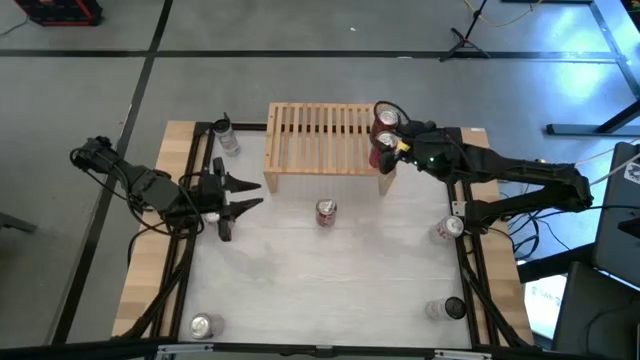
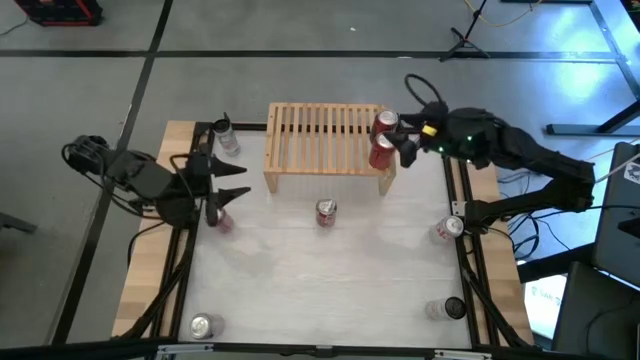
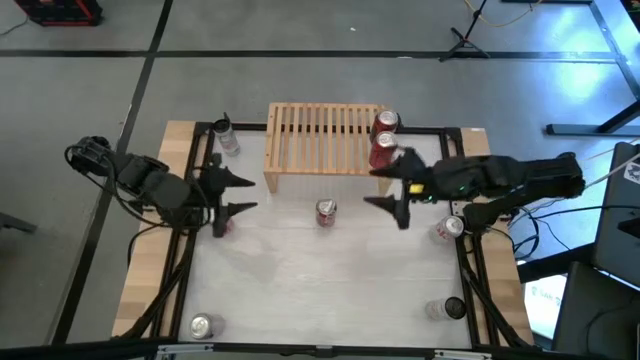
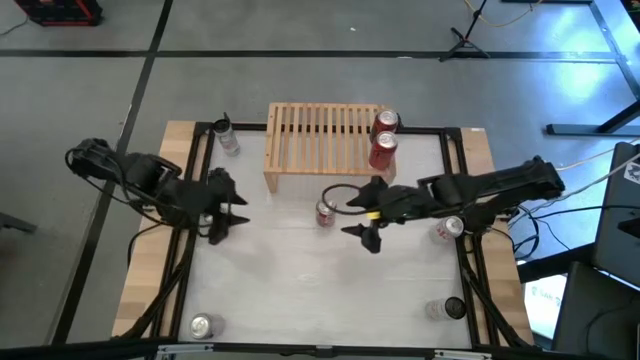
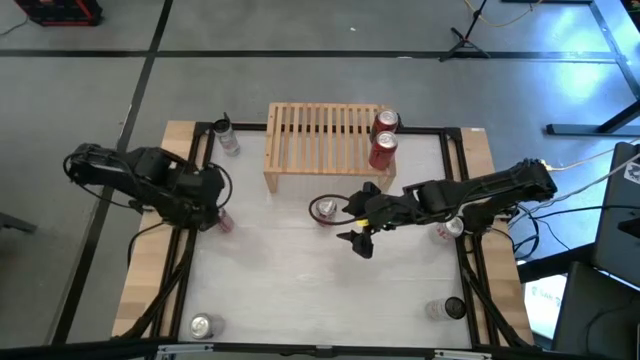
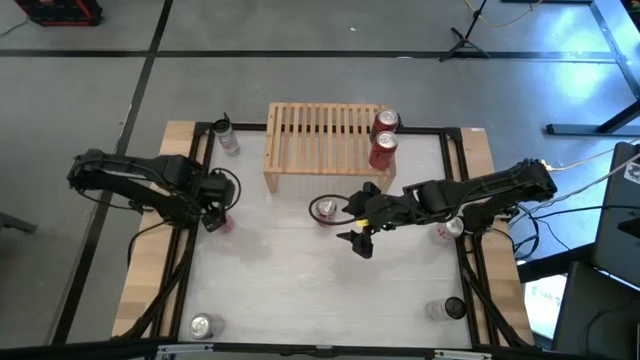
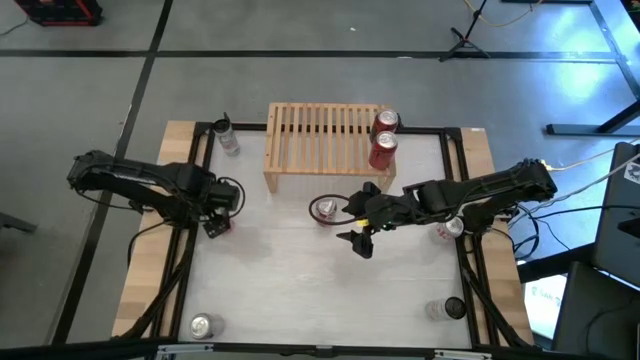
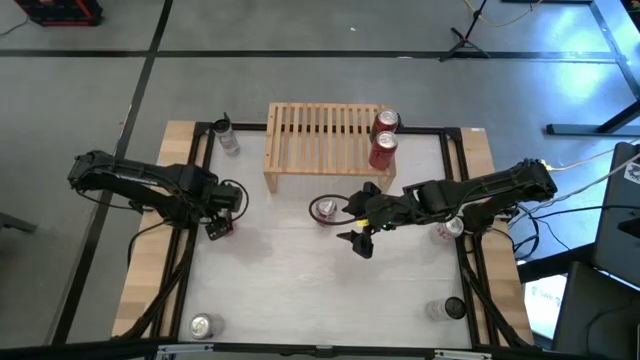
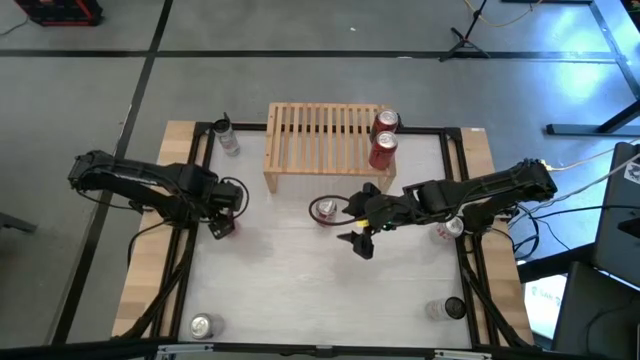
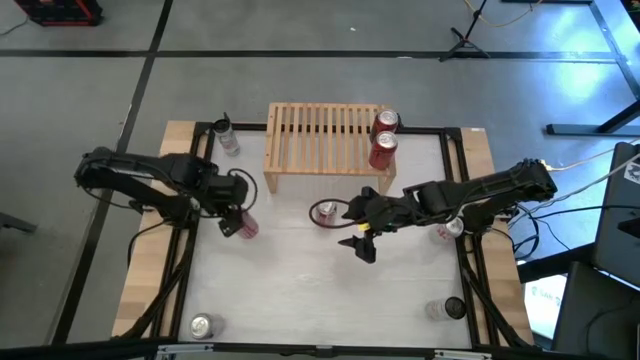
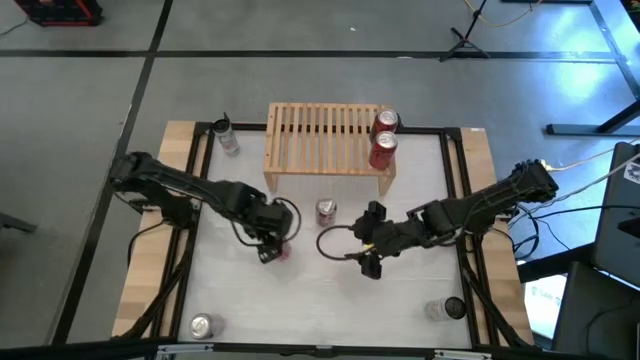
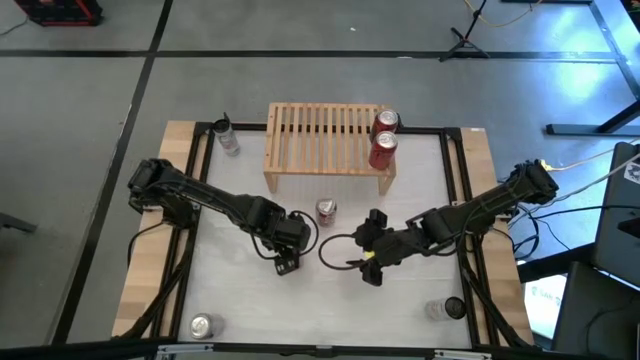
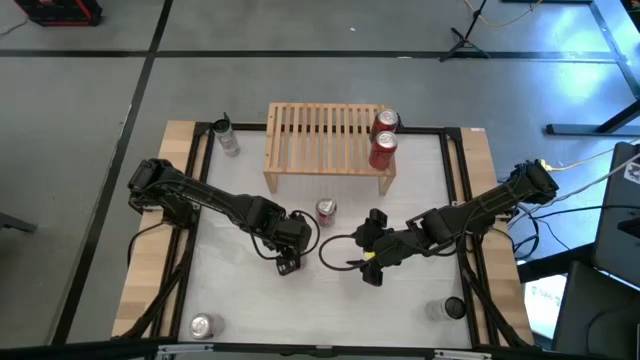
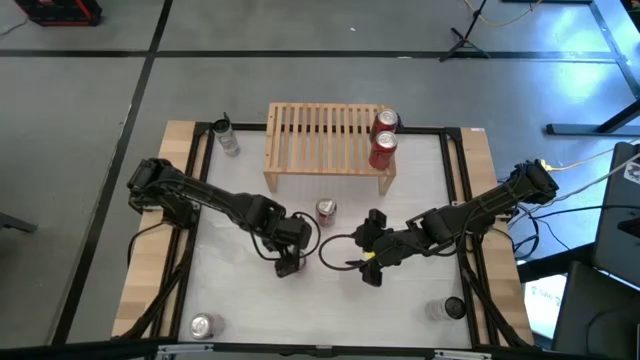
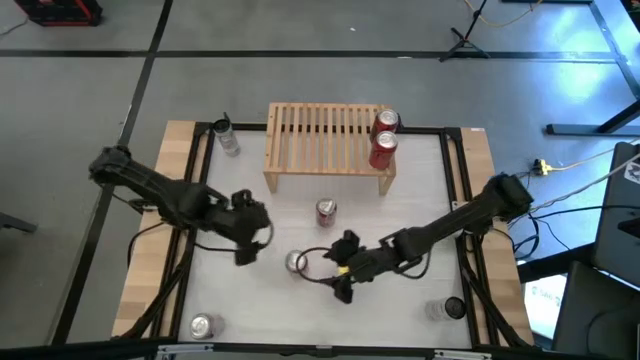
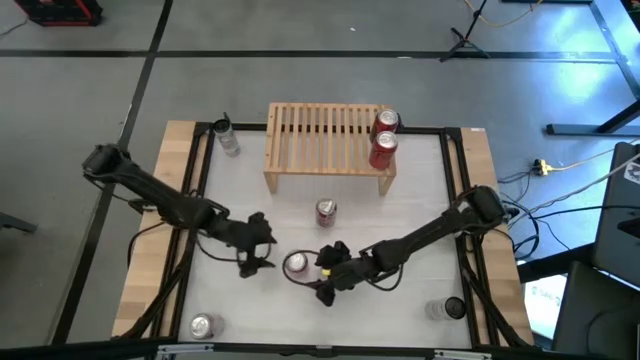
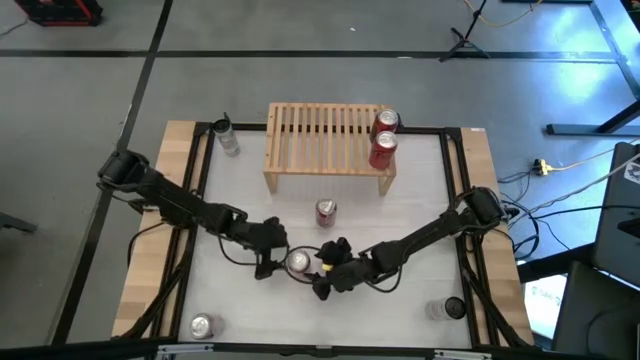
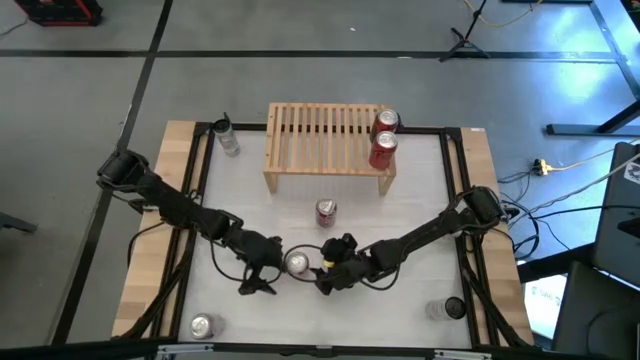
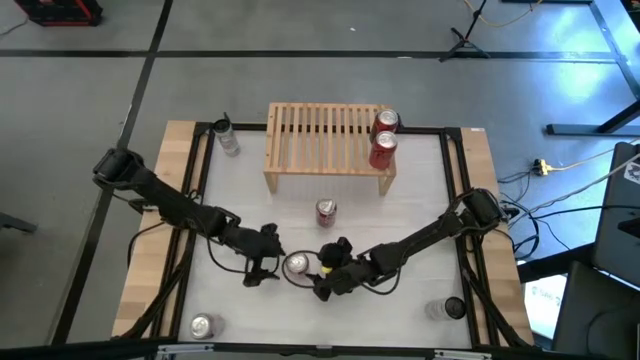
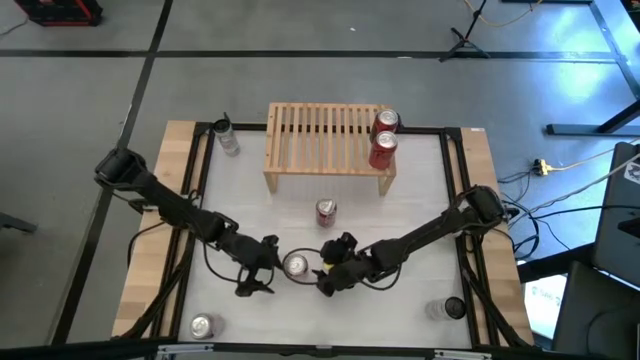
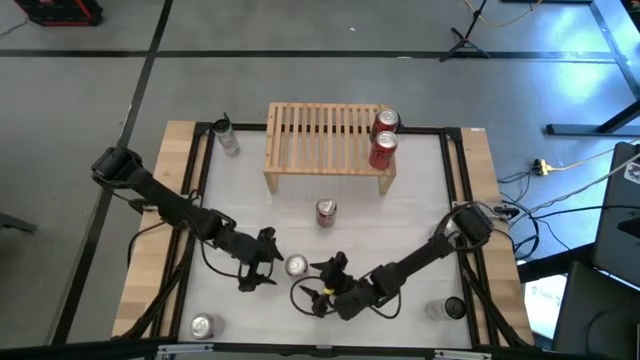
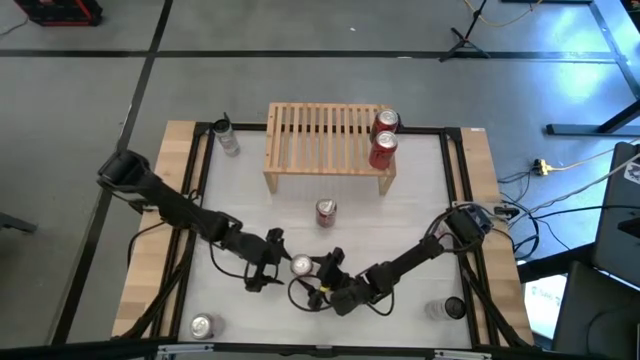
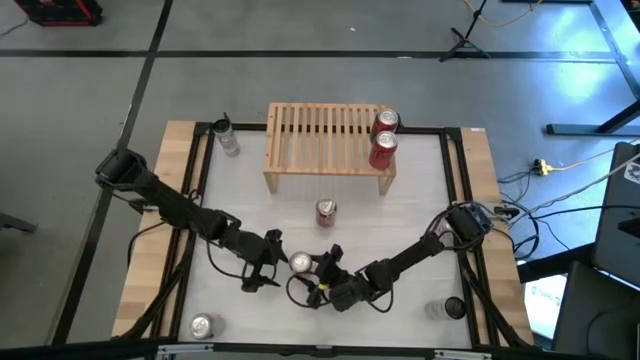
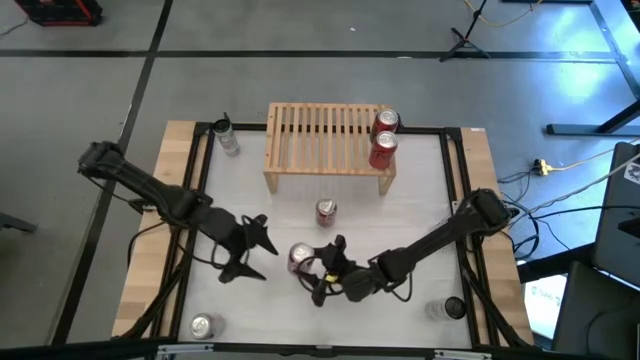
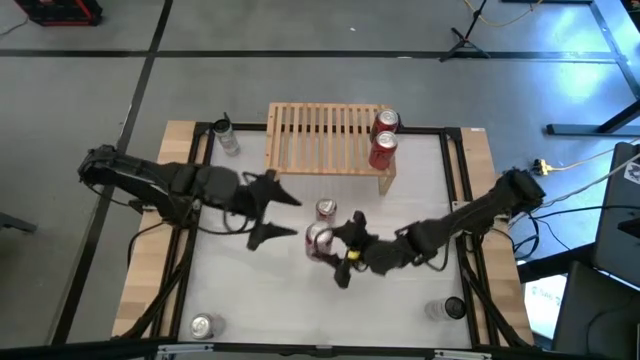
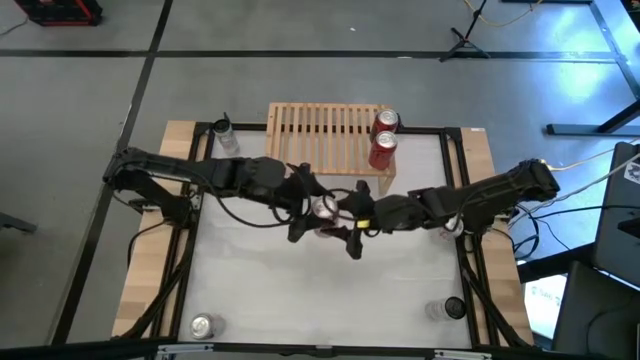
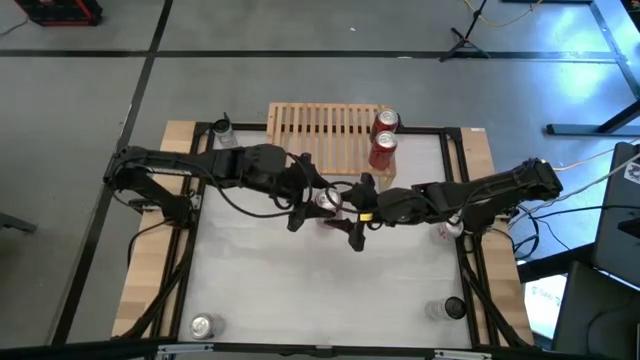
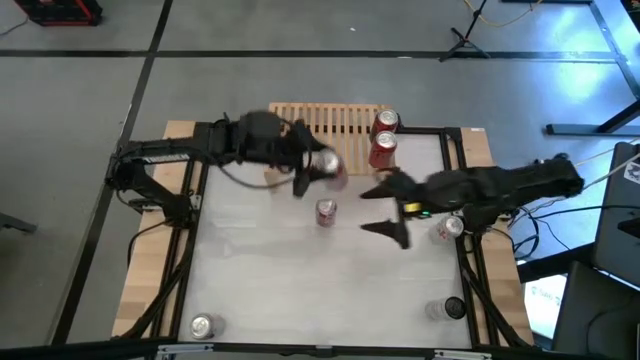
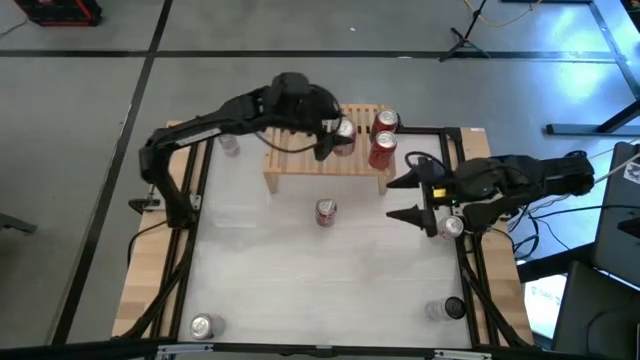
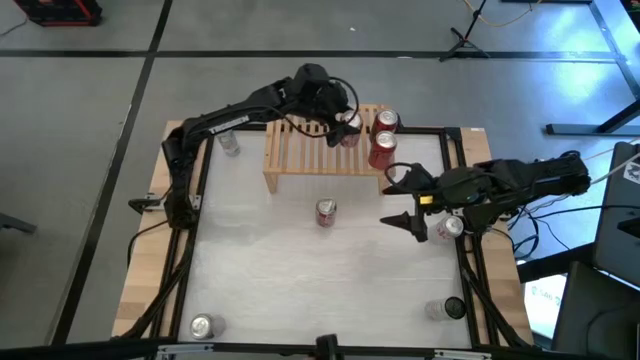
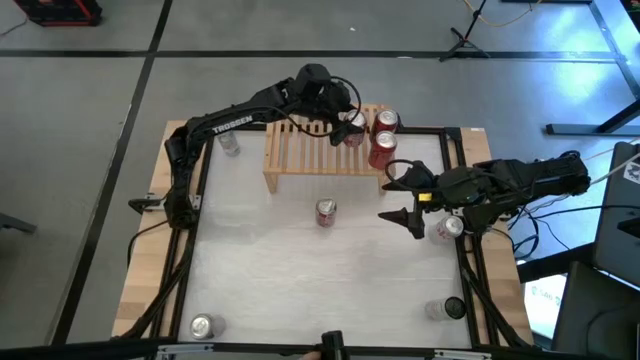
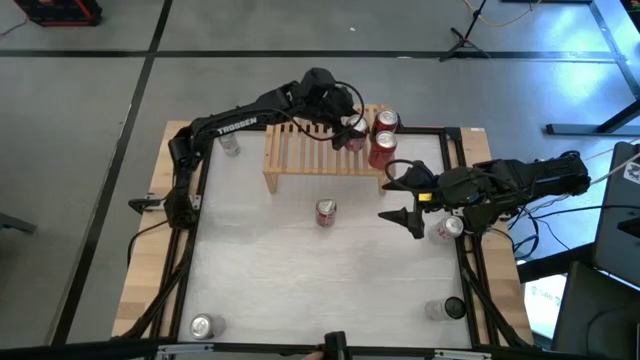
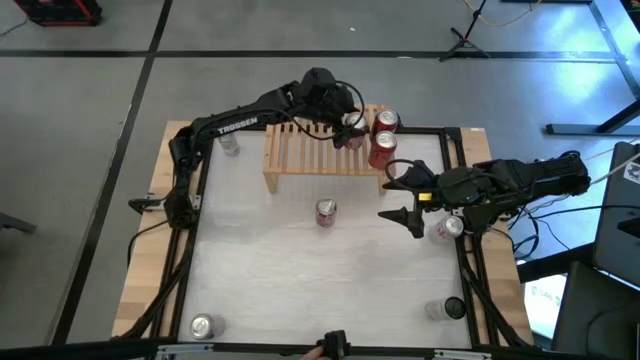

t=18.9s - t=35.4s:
Task: Place canned beverage on shelf
Put the left red white soda can on the shelf

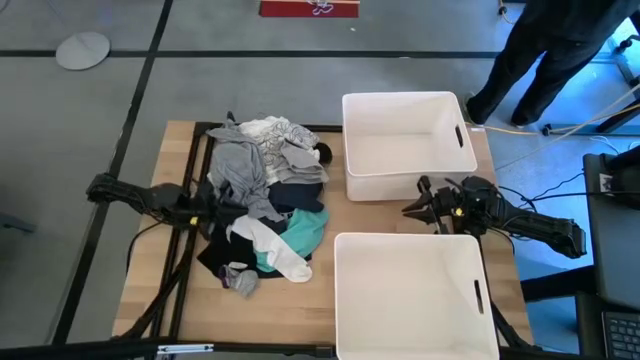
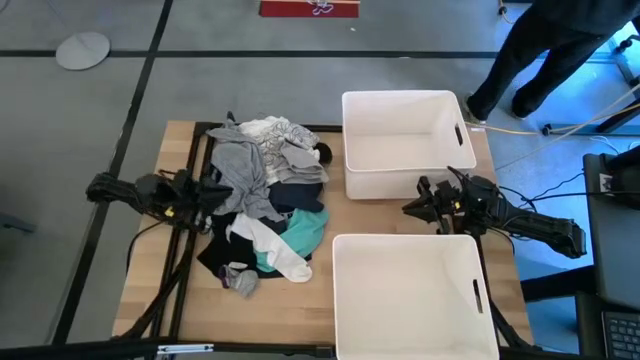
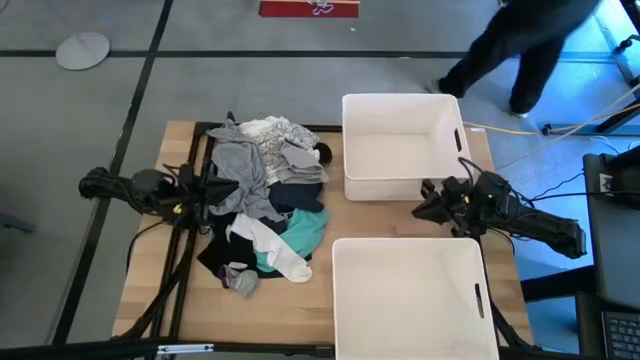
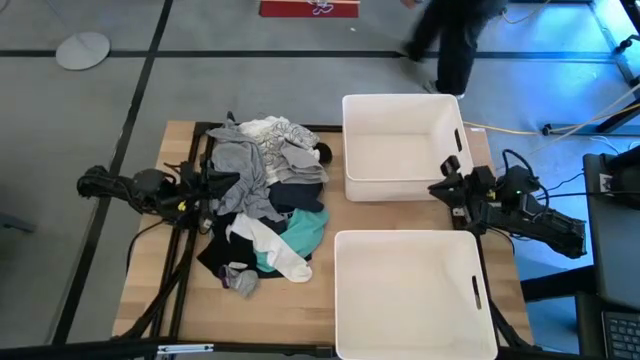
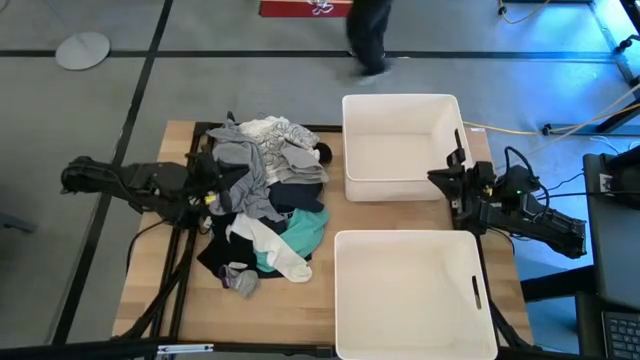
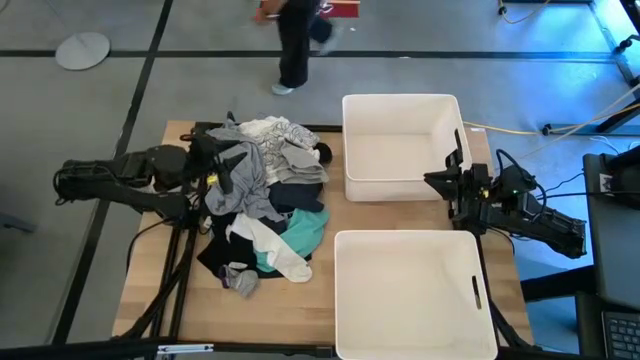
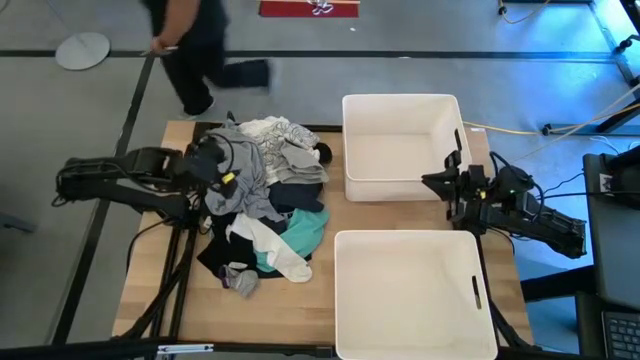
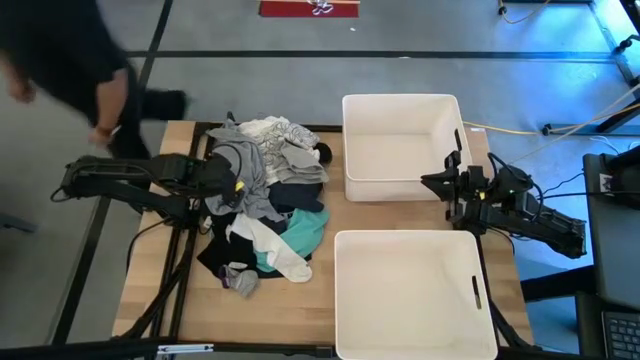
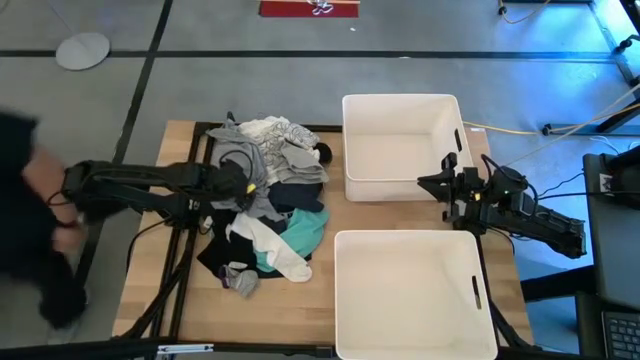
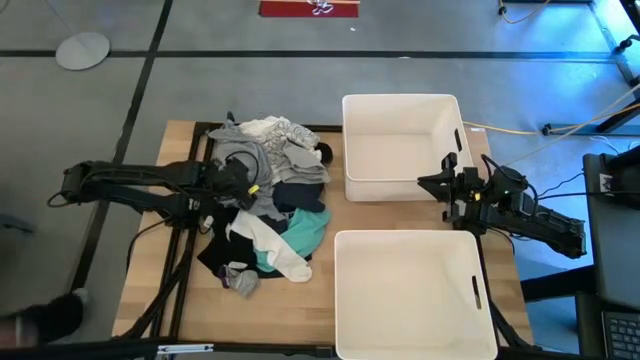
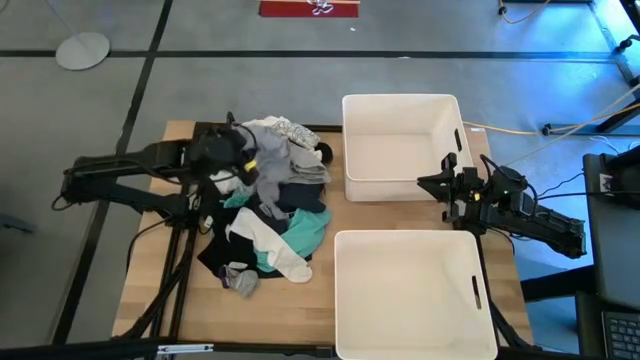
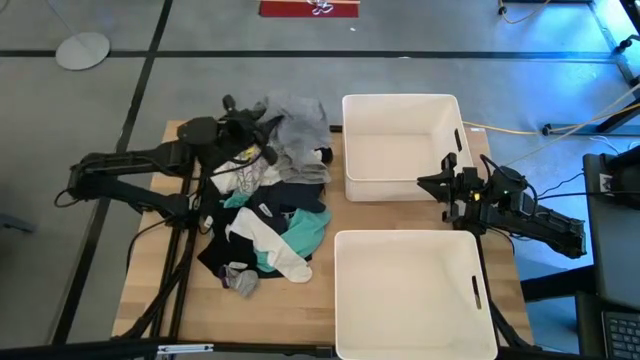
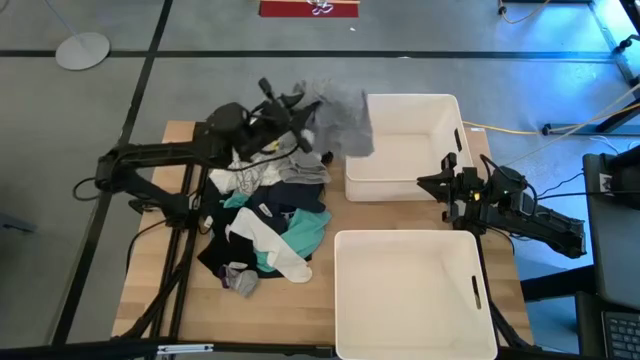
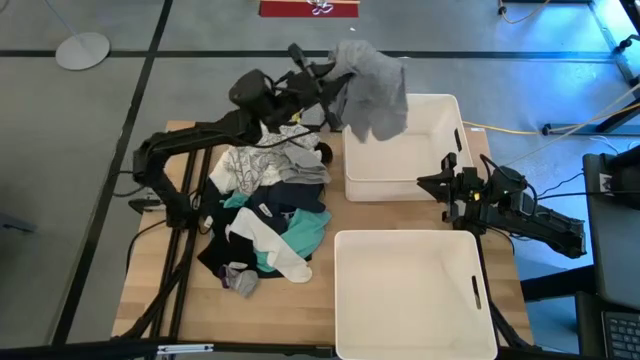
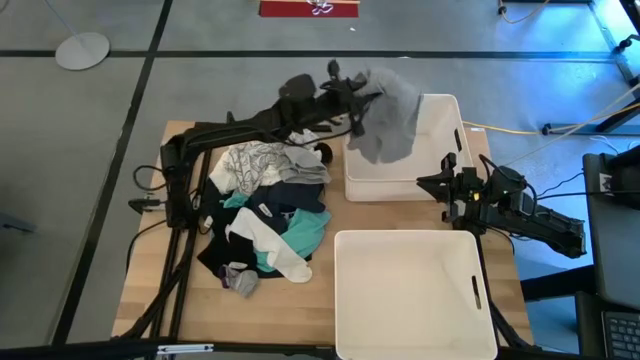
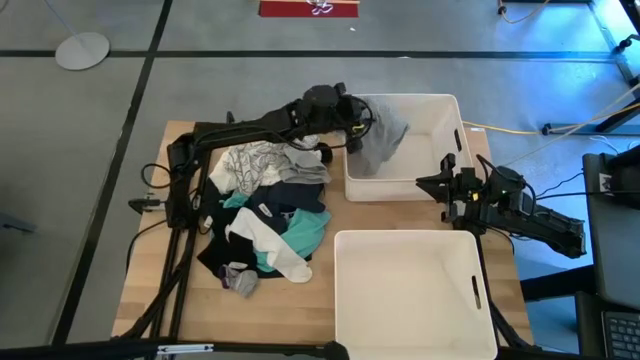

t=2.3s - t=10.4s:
Task: Sort clothes
Put the gray shirt into the top white laundry bin
